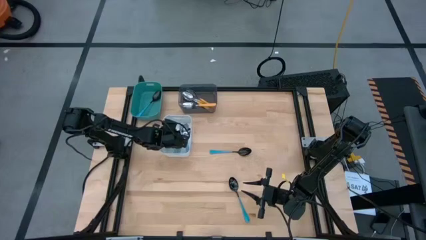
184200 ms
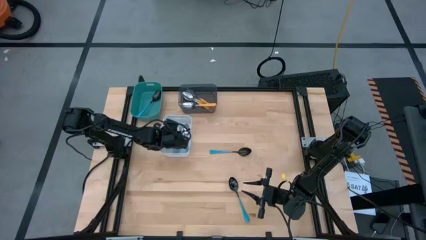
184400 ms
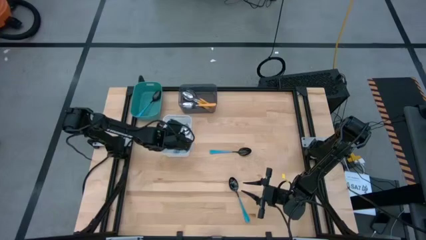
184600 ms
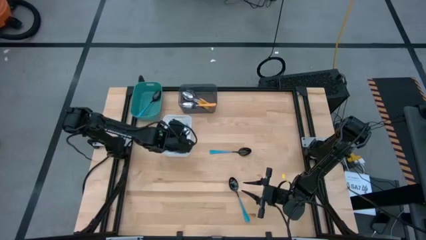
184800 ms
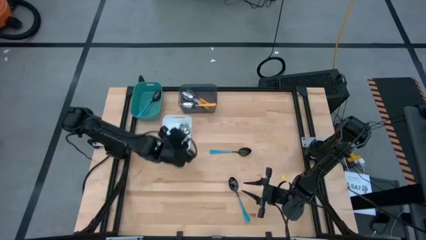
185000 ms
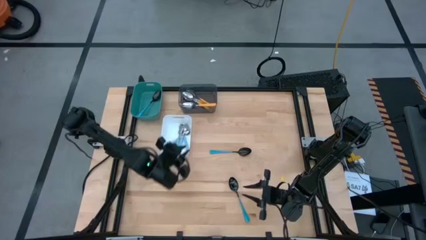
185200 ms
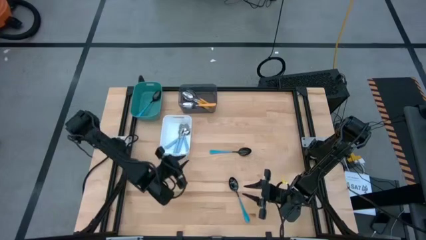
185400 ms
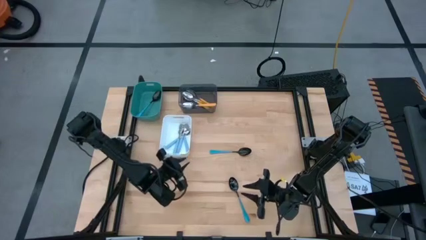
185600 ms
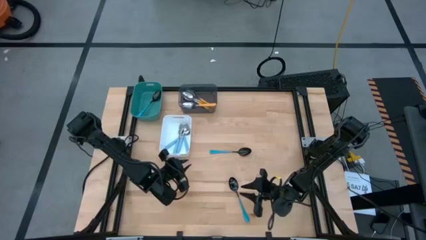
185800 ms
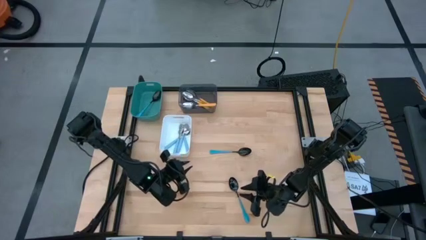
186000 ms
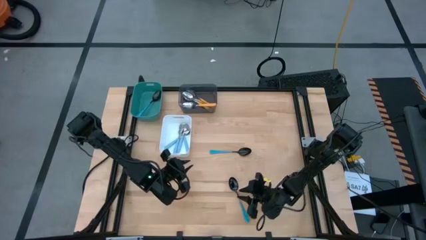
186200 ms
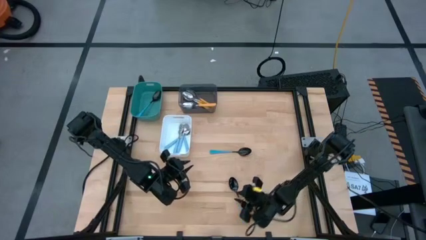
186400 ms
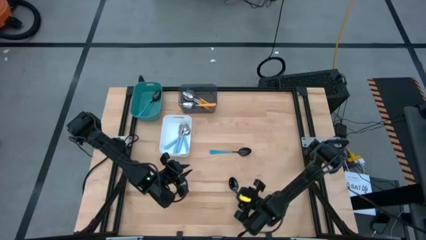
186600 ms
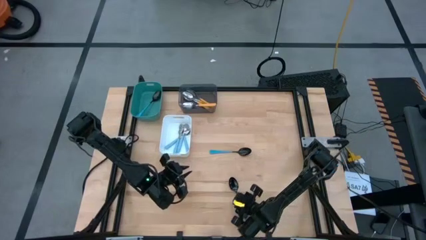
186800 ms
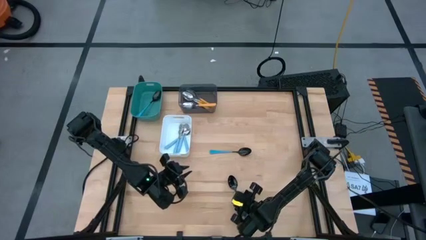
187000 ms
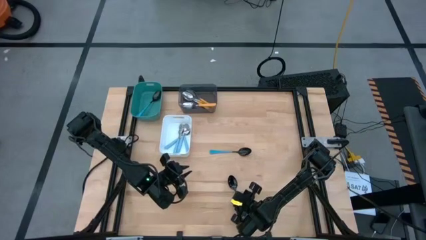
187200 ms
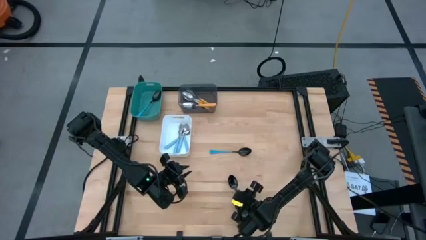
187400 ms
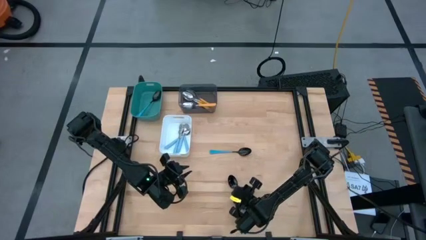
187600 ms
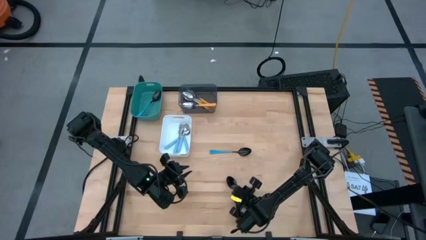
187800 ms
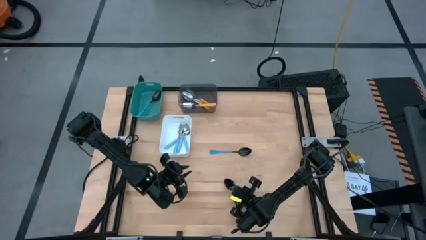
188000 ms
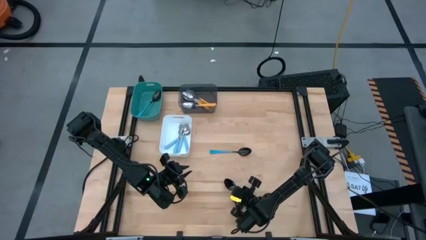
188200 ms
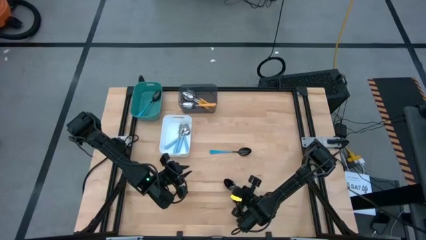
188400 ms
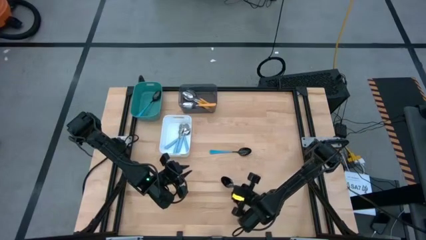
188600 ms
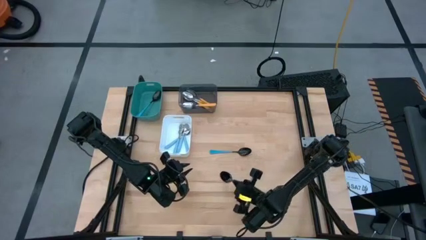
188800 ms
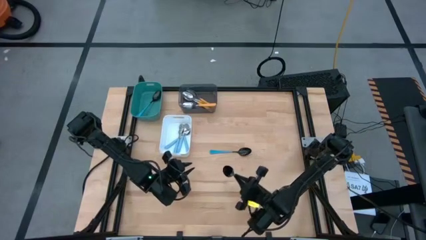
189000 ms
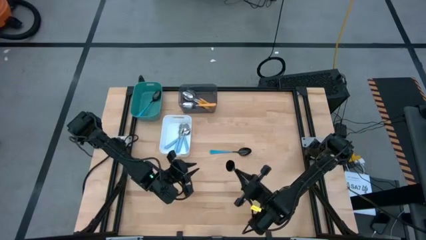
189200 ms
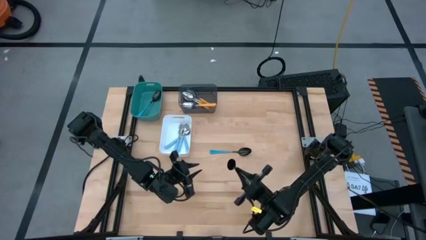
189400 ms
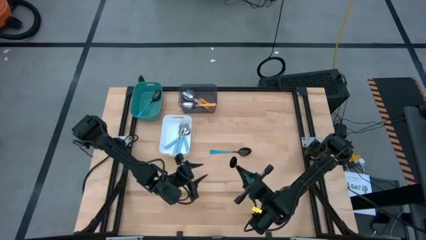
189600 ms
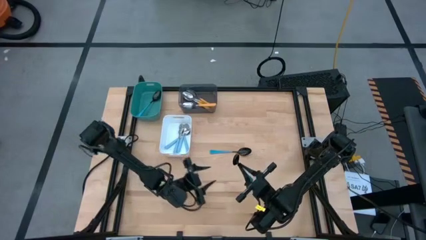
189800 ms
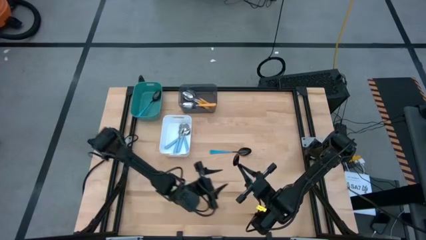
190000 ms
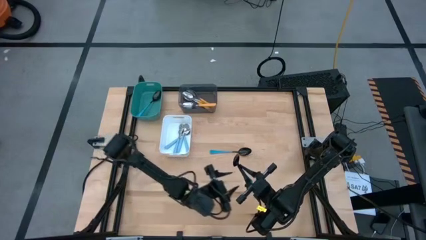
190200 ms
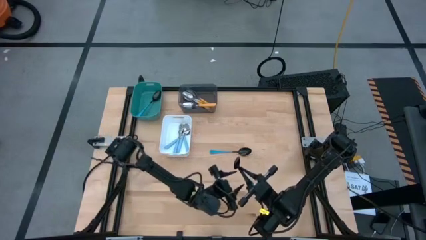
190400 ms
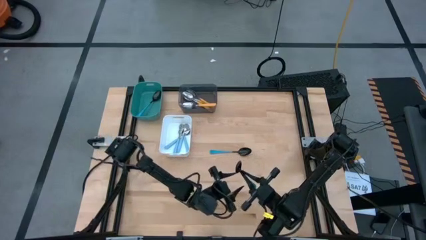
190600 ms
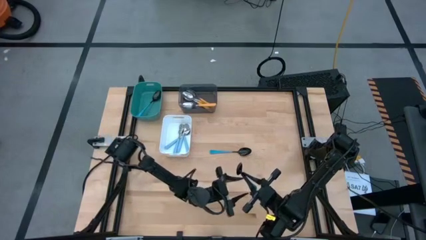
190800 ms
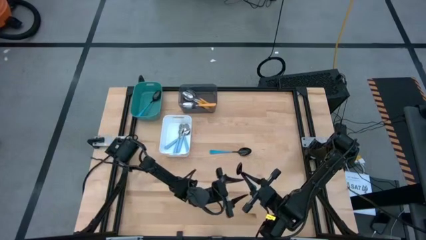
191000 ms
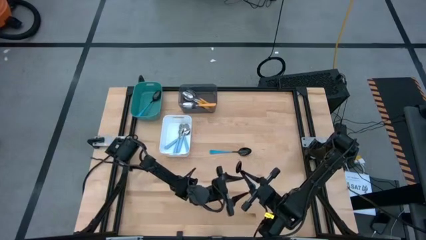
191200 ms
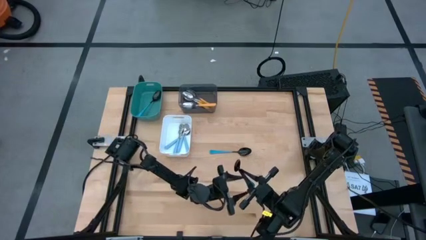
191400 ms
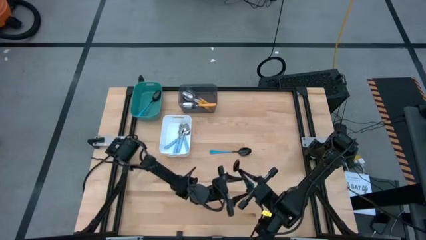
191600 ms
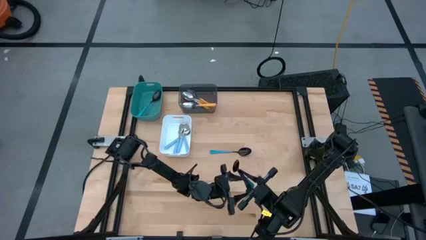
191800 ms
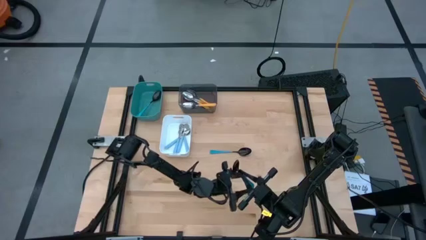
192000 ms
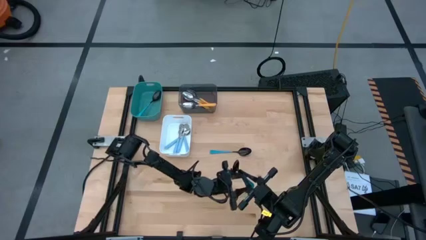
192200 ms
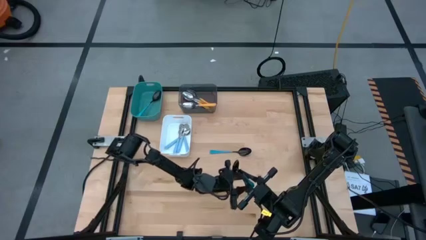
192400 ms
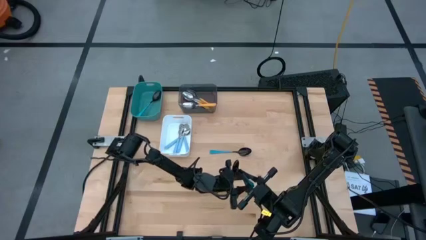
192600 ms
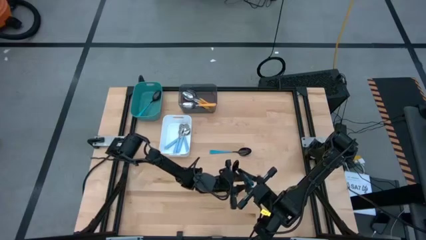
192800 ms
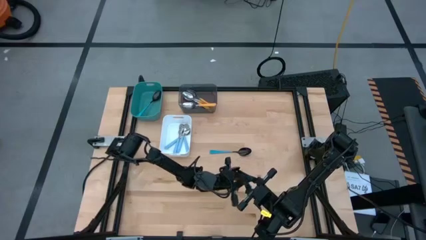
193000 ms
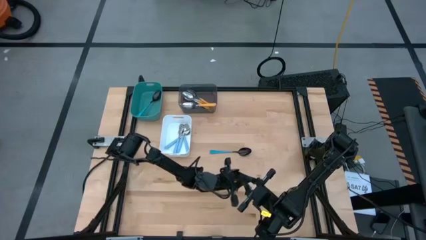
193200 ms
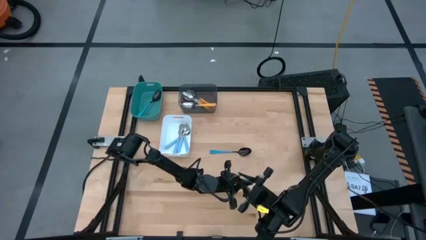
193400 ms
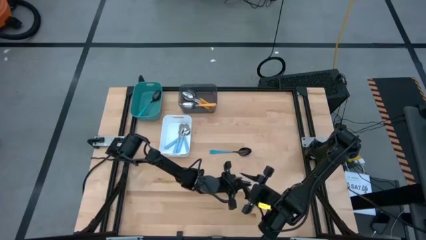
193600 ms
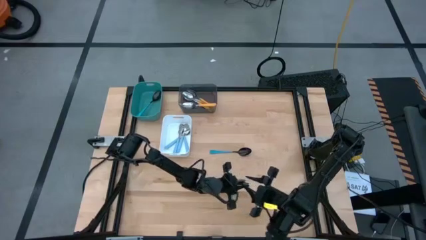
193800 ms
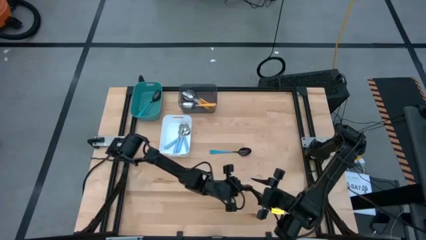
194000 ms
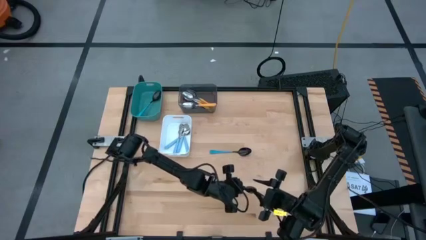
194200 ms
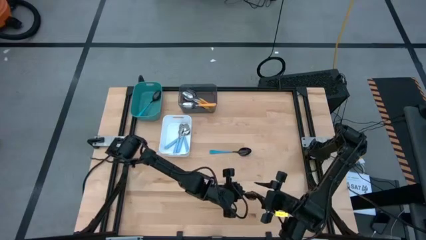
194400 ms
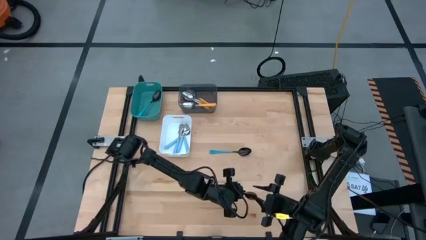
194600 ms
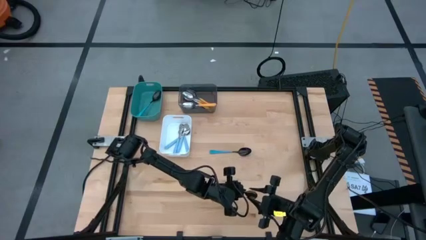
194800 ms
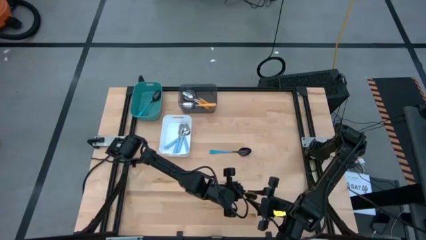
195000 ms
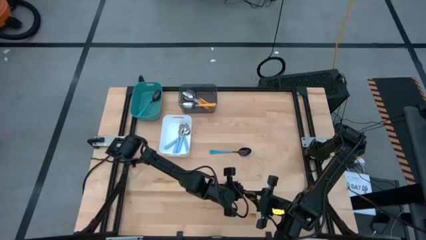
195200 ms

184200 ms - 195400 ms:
Task: Sort silverware by color (type)
Put the bottom blue spoon into the green bin

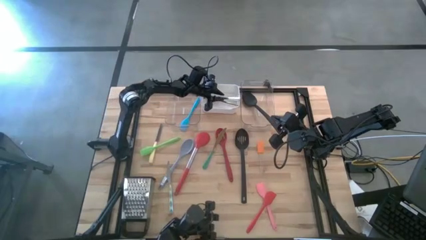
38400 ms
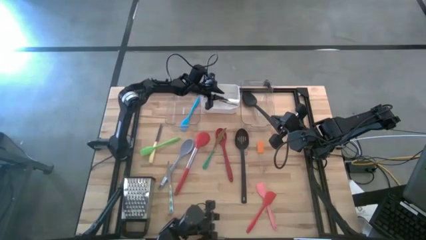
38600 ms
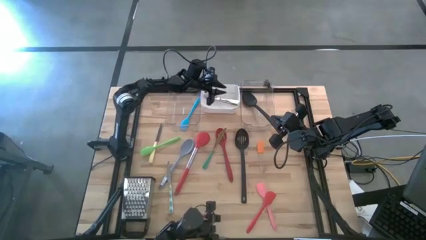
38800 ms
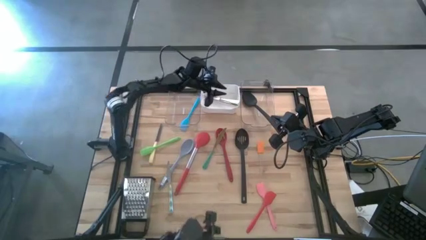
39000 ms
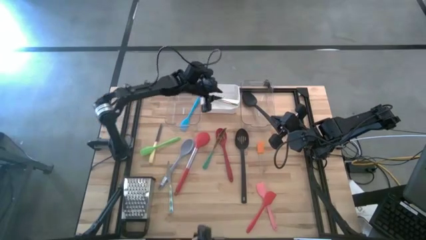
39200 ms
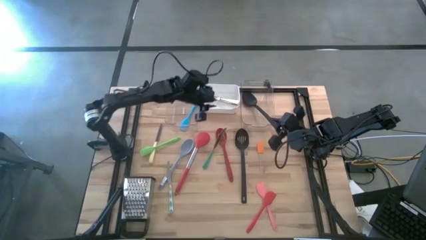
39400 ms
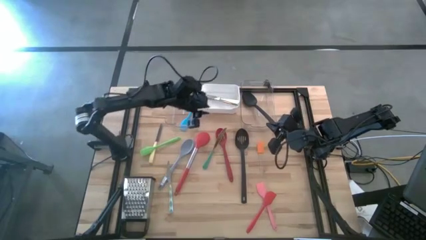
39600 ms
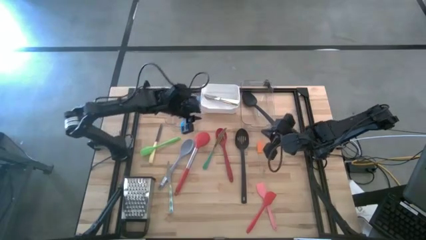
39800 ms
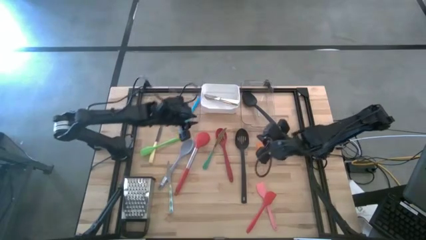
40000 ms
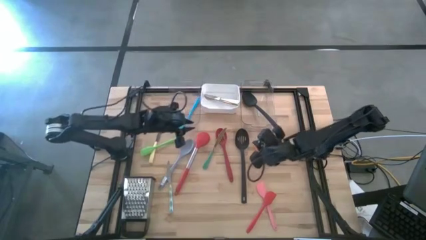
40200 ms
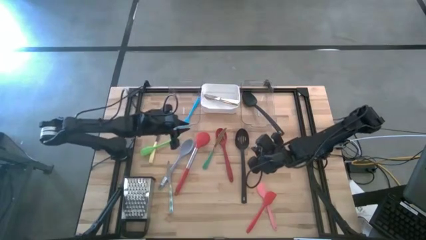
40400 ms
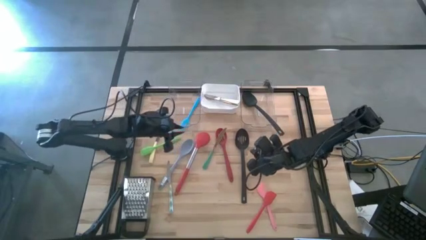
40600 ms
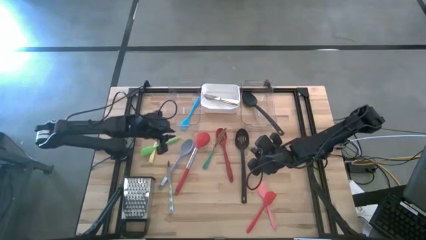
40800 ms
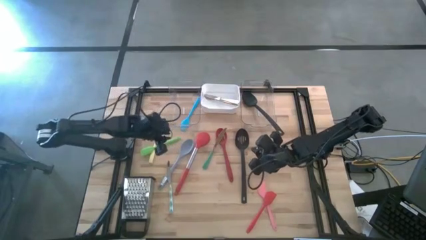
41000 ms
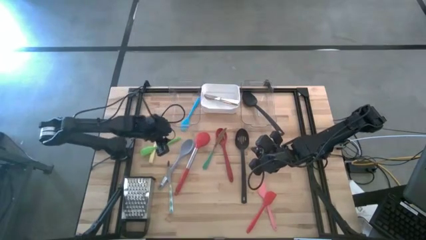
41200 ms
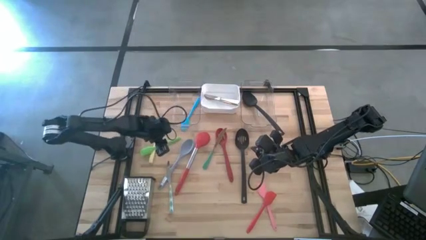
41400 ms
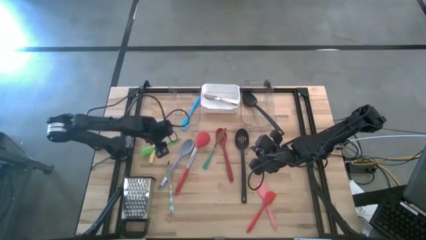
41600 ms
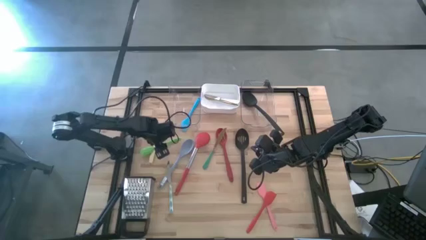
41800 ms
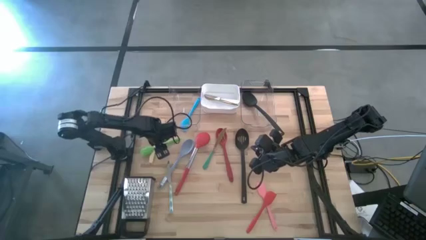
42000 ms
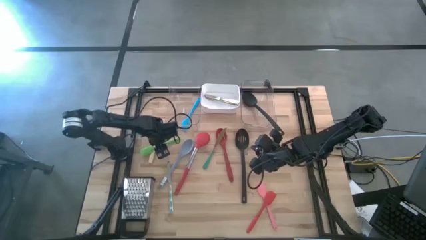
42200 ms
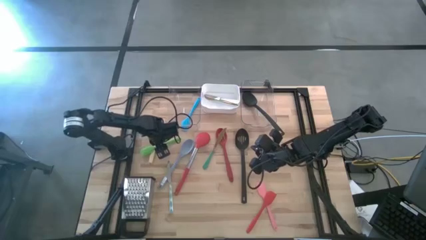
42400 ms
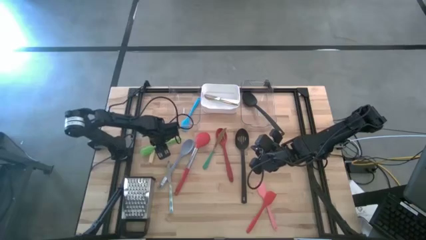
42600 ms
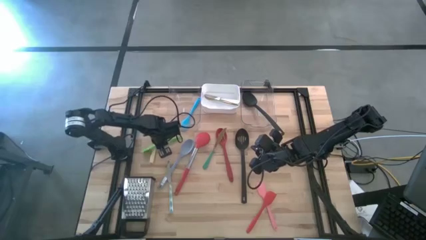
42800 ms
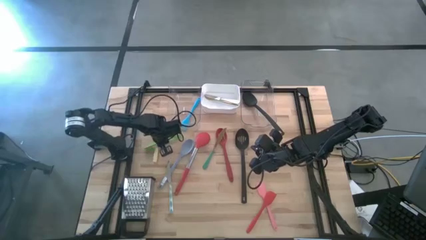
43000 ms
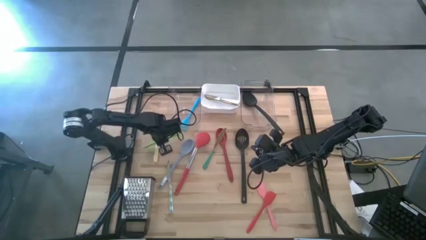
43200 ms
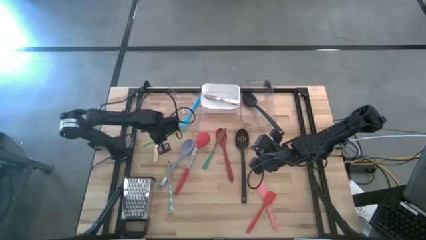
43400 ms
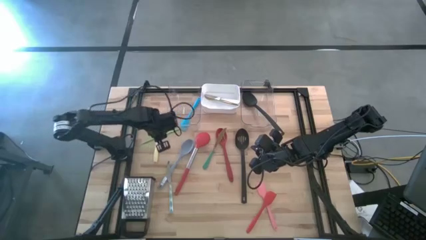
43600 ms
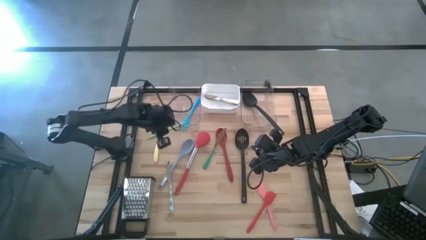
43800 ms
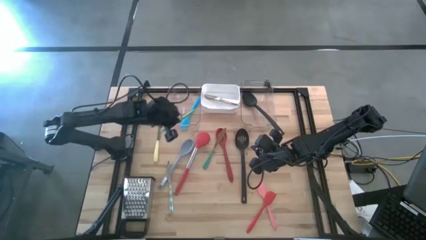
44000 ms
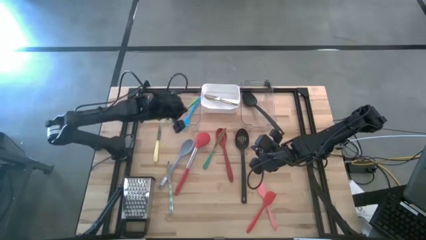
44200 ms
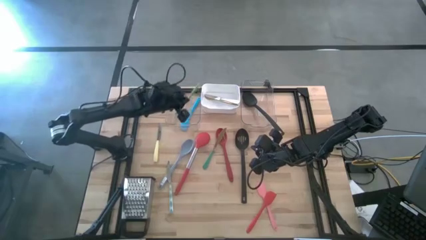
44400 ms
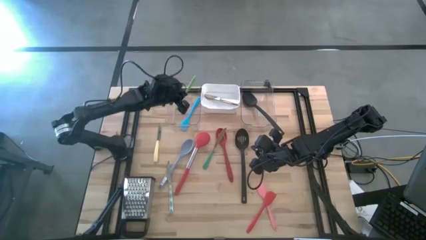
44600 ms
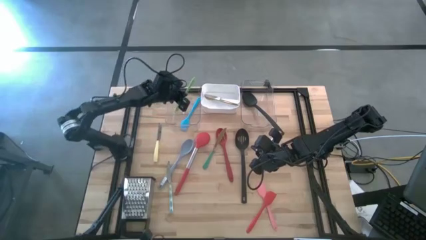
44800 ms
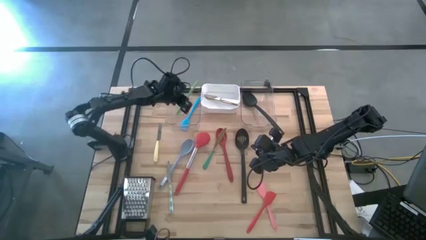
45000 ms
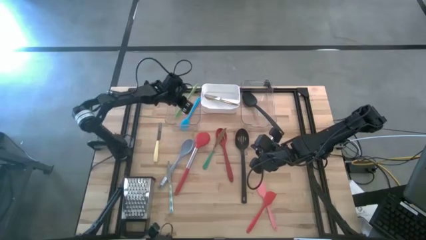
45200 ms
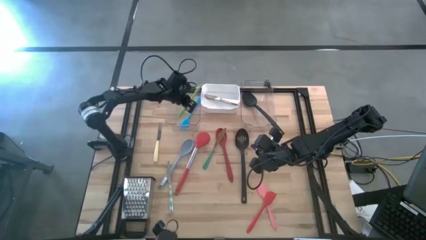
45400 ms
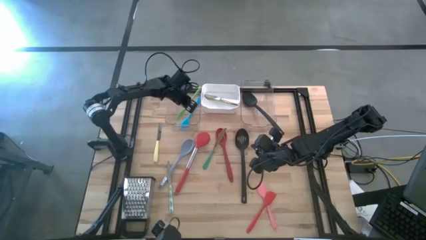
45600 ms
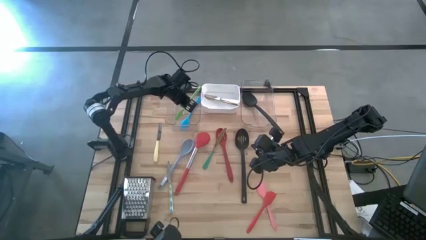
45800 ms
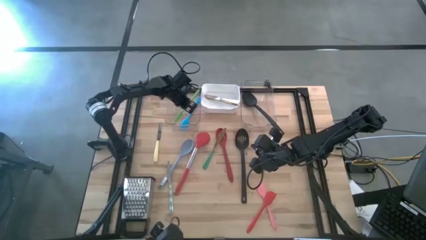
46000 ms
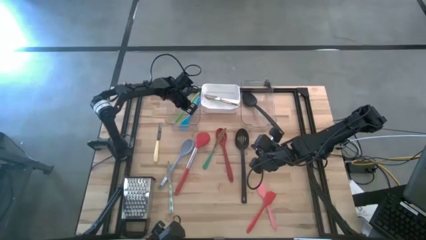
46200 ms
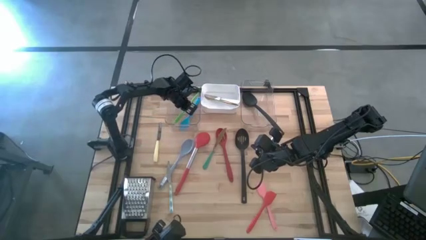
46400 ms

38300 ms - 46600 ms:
Task: Pick & Place Kitchen Items
Put the green spatula into the left transparent bin
